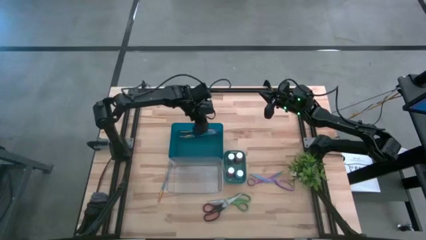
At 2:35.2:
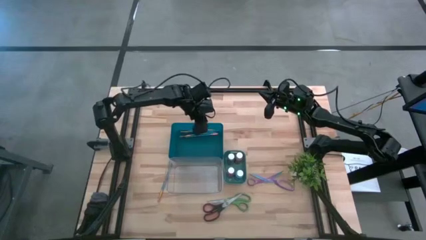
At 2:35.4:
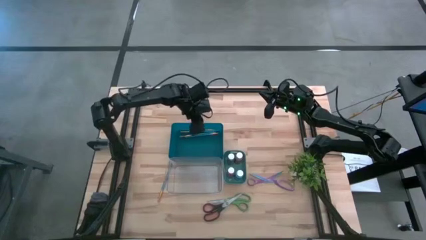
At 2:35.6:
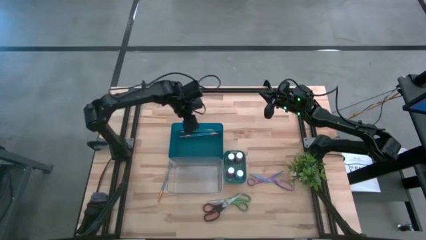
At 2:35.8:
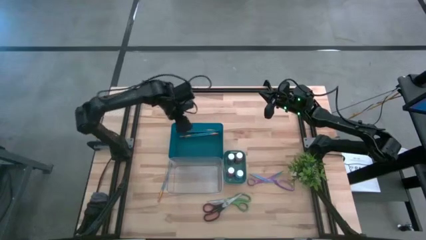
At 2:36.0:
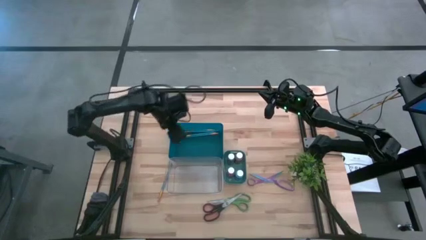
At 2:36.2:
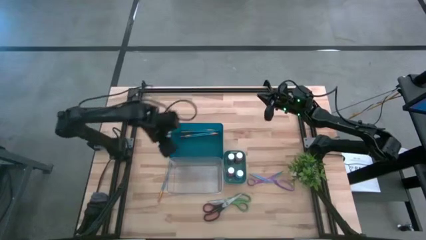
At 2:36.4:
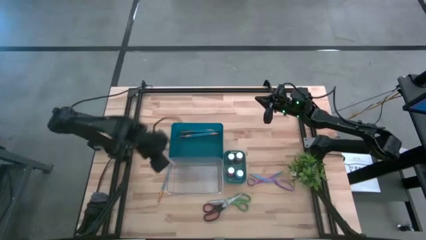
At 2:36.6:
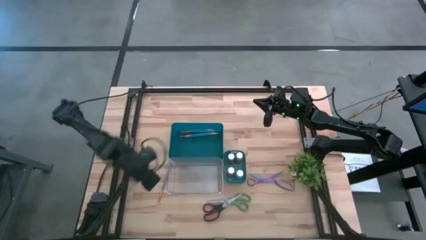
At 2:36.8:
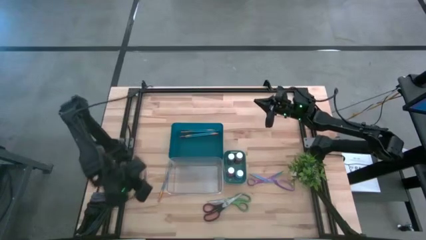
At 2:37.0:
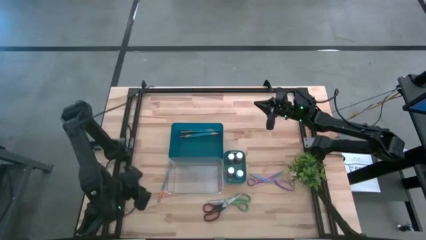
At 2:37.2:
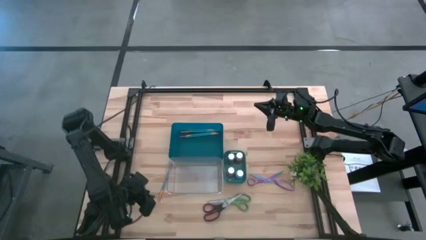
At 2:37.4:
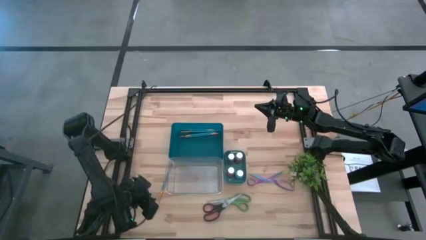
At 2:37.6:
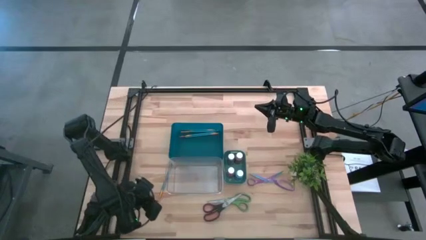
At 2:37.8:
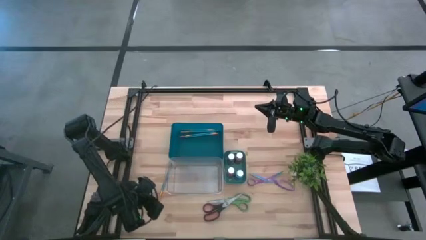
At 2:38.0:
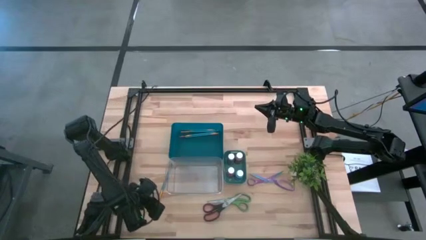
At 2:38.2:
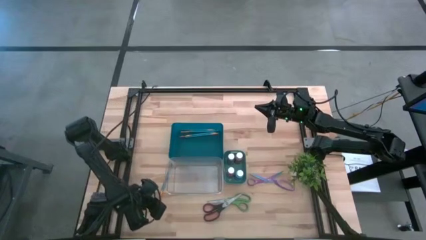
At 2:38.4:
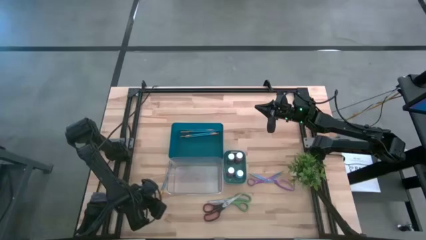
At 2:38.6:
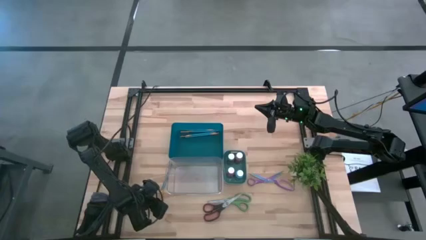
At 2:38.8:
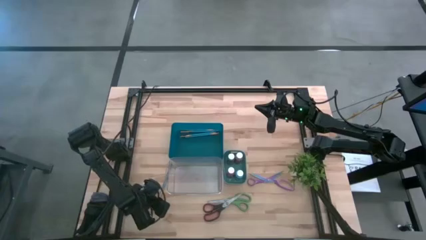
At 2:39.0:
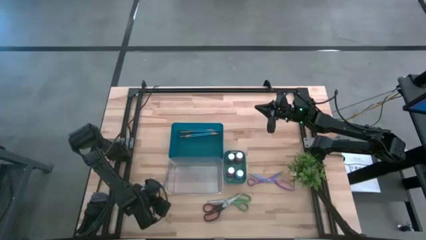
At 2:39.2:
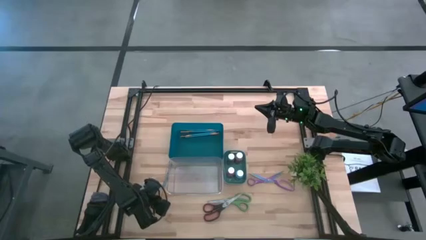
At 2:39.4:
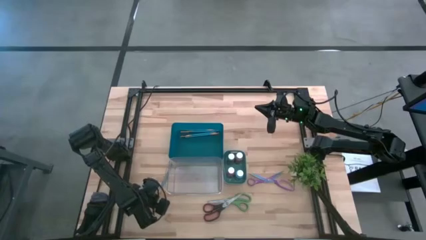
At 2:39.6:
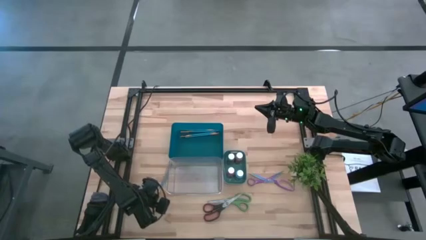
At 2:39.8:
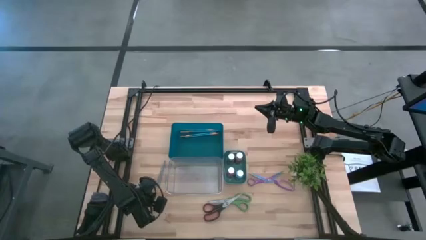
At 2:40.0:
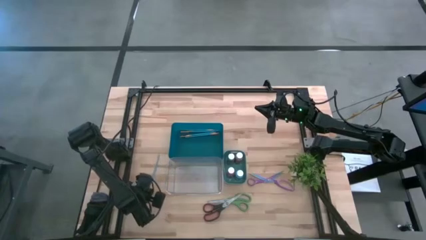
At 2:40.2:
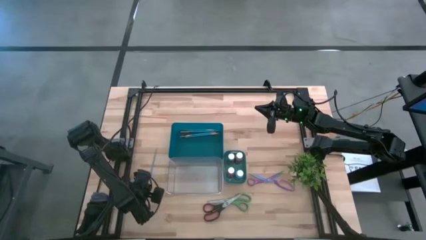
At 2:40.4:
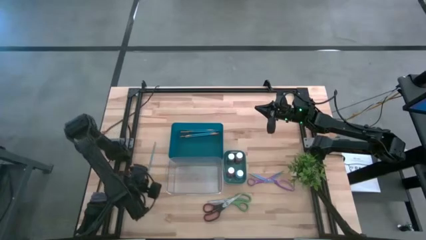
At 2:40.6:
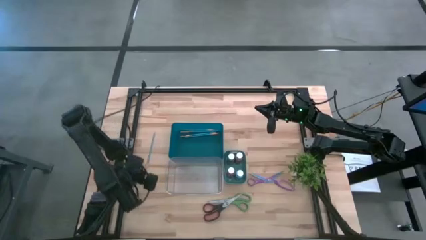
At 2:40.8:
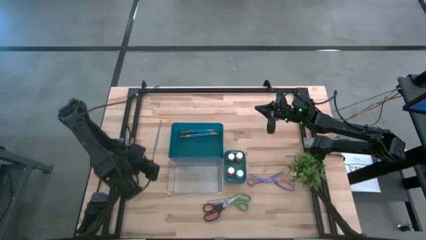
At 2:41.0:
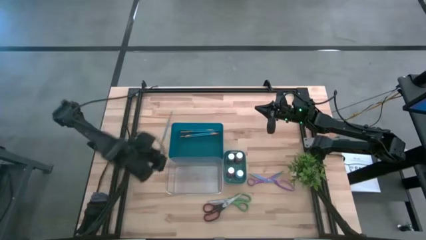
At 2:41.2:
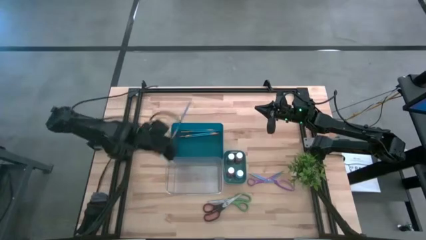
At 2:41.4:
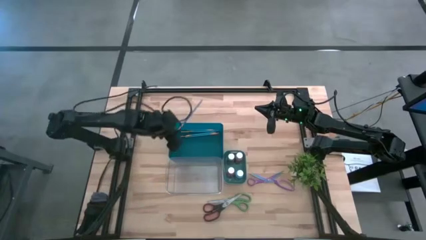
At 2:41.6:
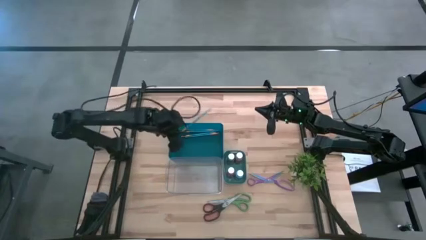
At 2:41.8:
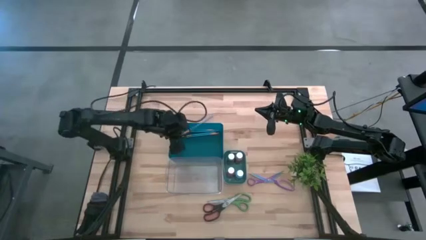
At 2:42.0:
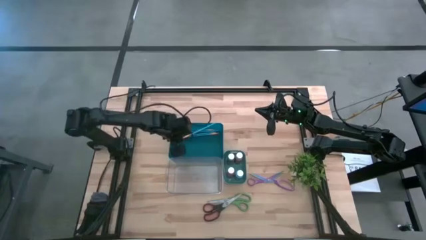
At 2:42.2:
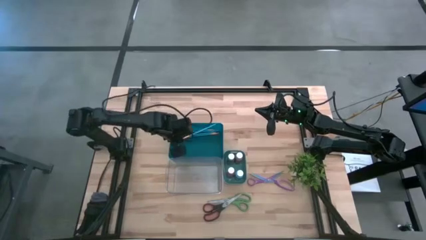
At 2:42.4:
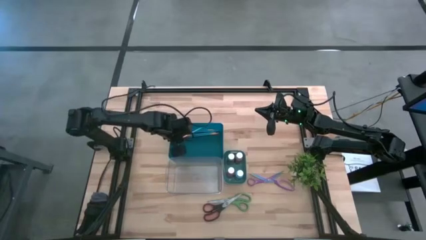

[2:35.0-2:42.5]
Task: Pick & Place Paint Supplies
Put the blue paint brush into the blue bin

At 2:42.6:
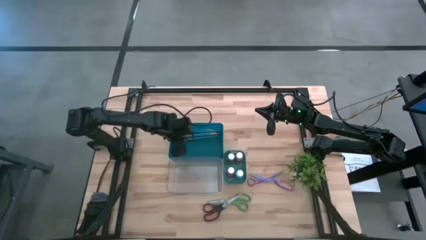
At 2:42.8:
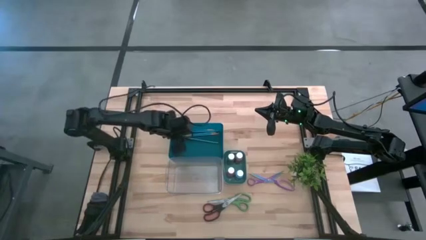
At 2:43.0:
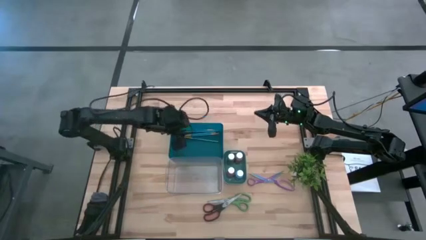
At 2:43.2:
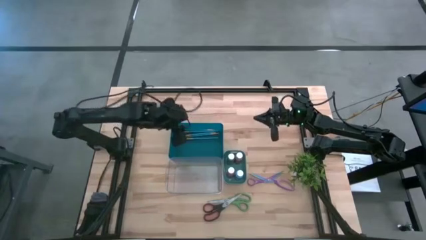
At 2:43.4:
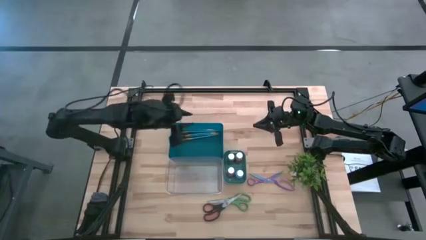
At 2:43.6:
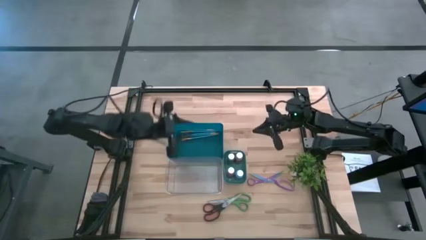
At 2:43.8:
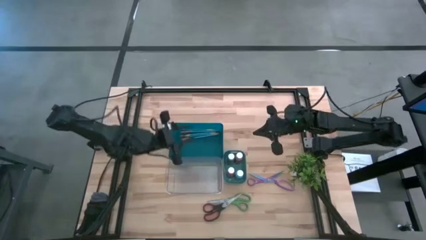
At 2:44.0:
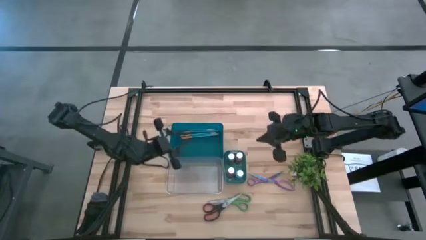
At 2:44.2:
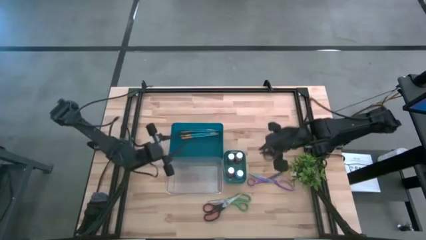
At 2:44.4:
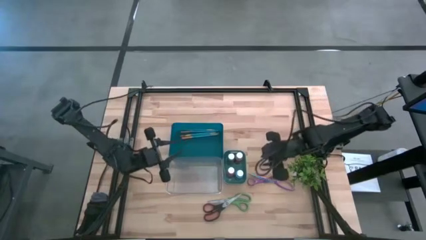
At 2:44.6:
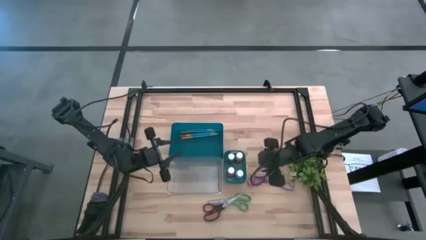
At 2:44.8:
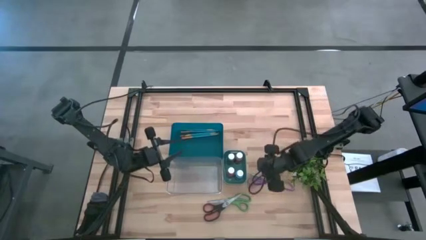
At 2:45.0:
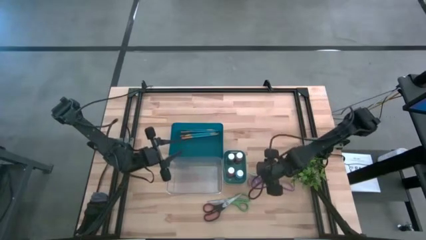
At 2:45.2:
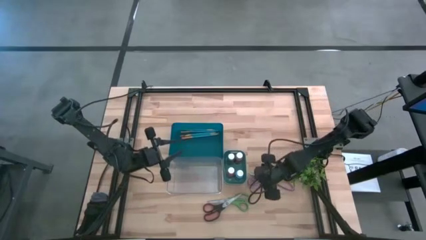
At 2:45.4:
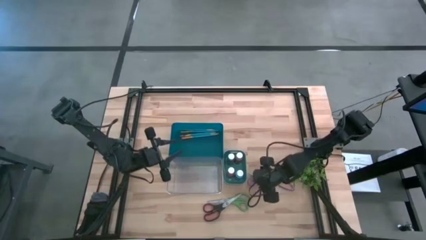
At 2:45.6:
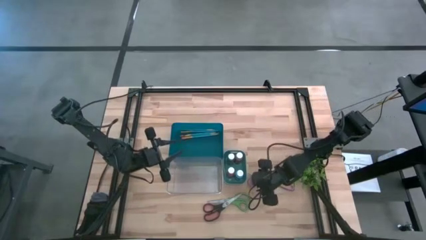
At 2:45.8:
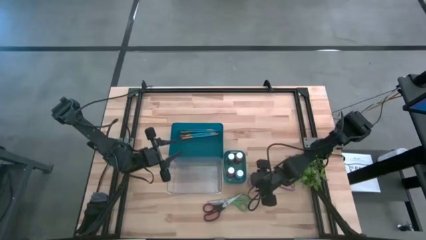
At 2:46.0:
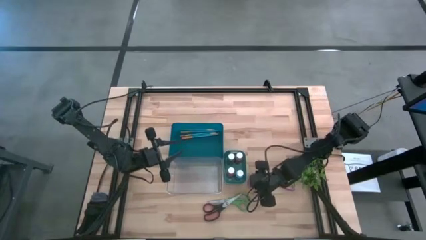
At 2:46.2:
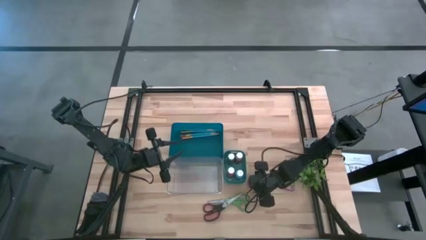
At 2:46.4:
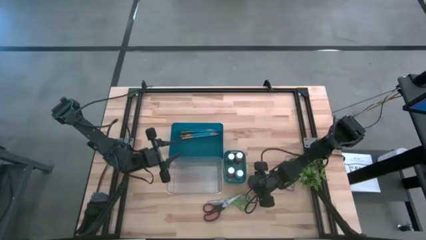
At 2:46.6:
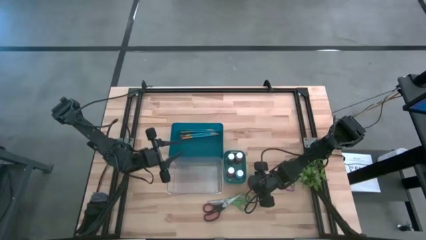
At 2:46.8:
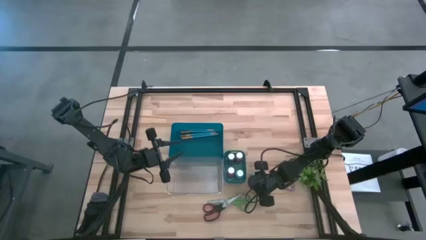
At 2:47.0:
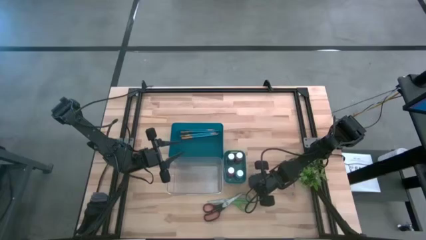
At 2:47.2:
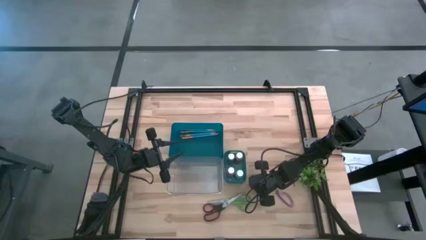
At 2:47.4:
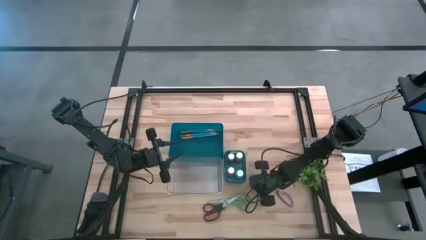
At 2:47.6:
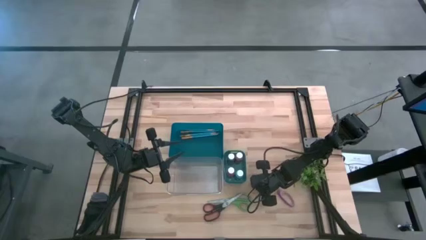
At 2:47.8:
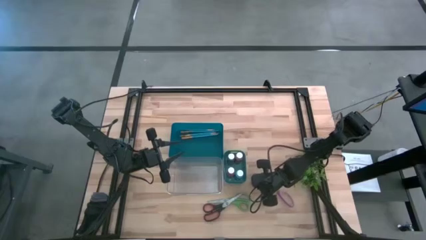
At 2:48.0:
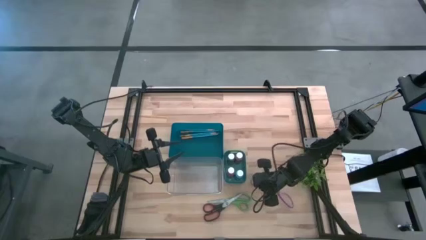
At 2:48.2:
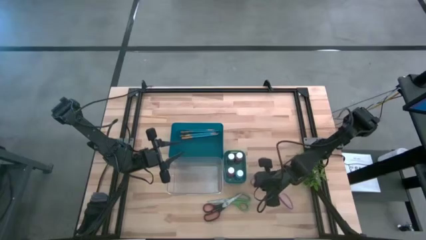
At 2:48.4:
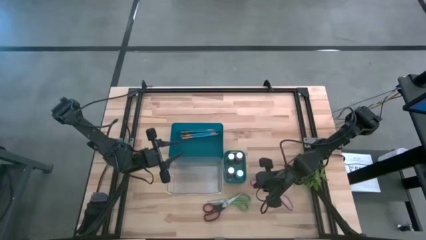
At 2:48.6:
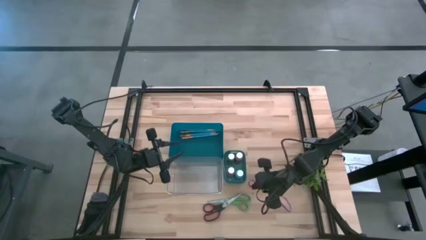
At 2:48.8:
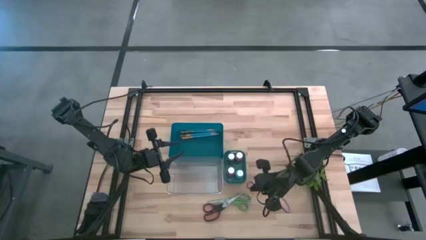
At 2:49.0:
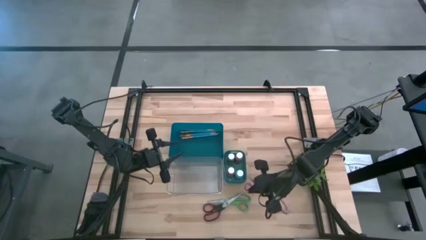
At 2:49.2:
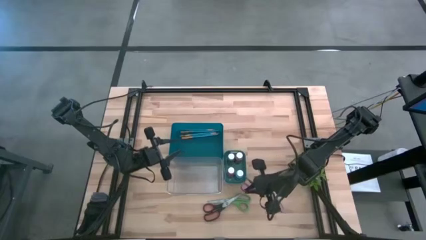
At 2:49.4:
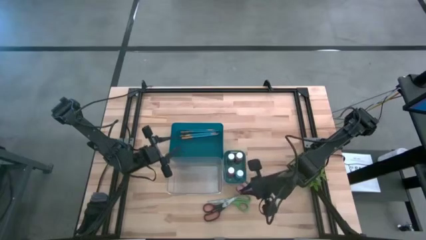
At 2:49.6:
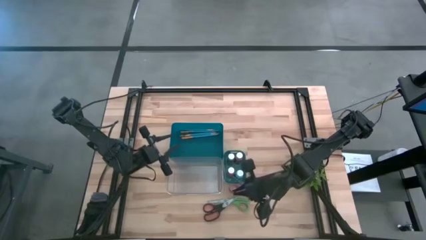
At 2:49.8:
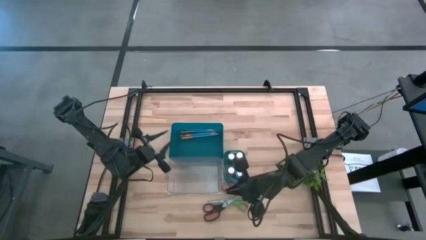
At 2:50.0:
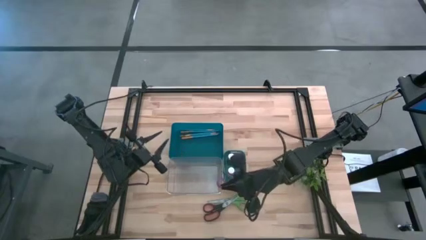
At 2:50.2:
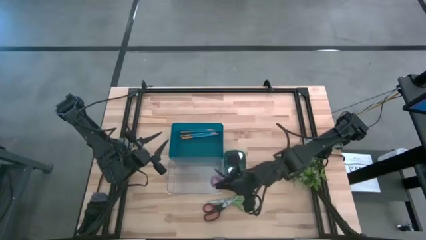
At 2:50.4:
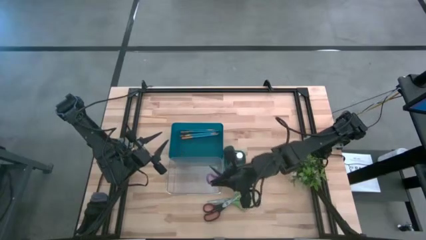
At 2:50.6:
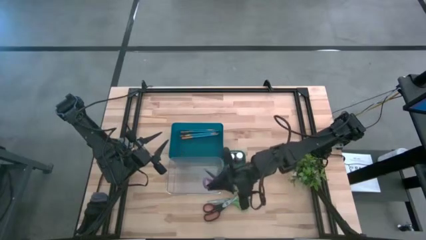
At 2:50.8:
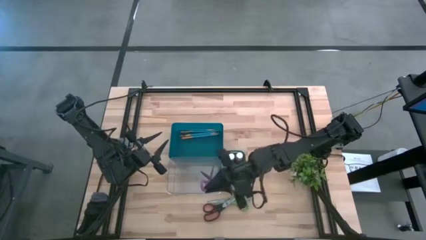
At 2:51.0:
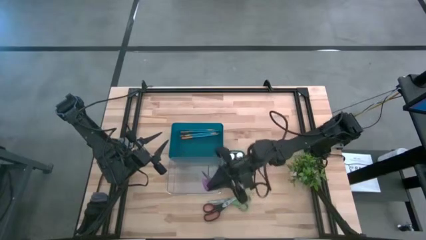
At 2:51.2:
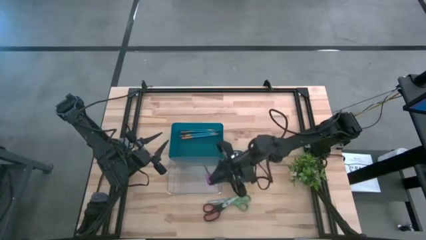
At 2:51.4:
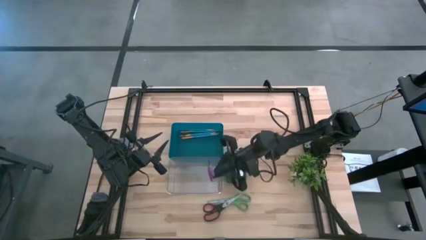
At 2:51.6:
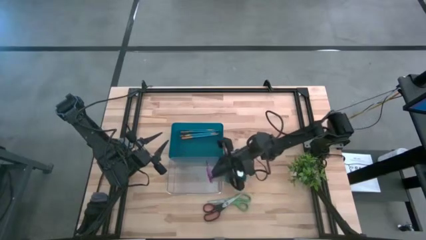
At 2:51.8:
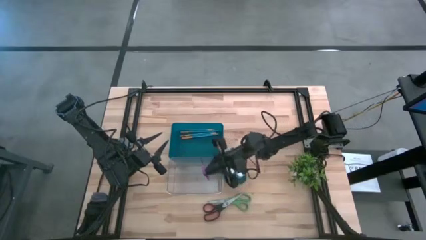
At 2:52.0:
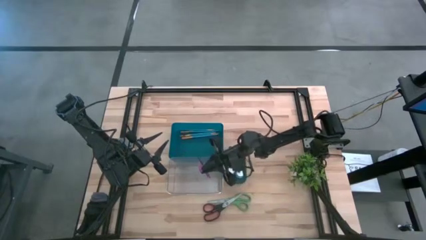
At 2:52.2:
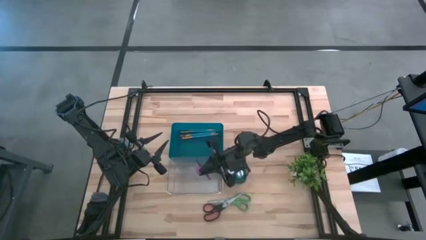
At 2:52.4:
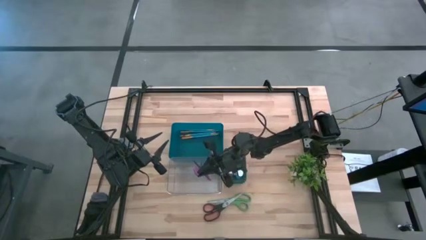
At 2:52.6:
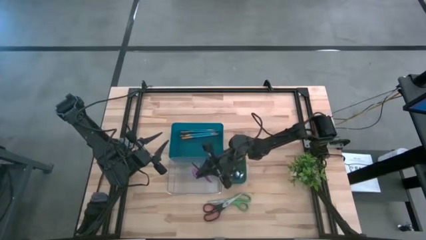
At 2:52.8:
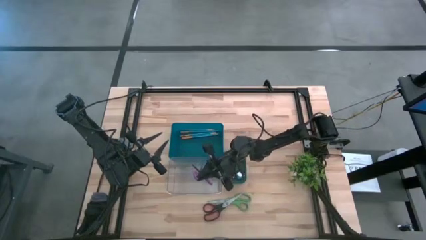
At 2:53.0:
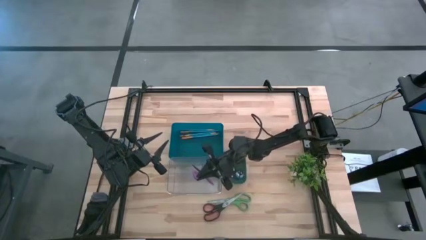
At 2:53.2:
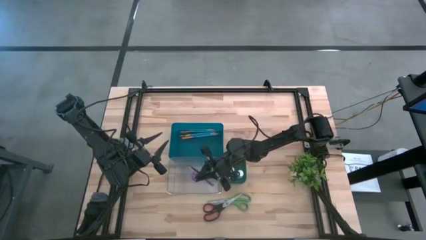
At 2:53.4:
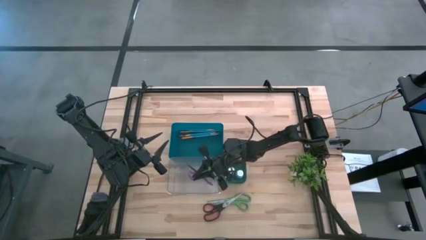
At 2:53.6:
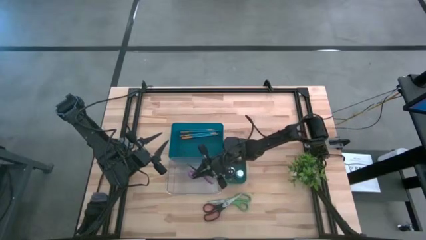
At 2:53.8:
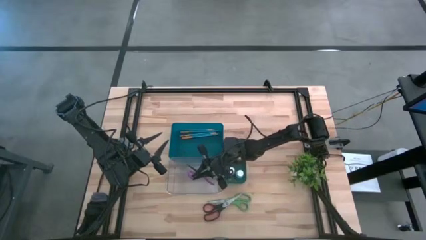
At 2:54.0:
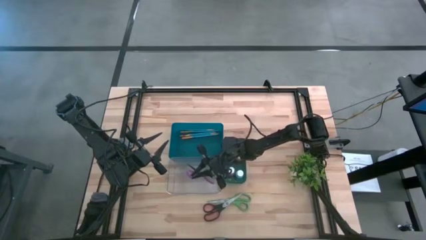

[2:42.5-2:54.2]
Put the violet scissors into the transparent bin
